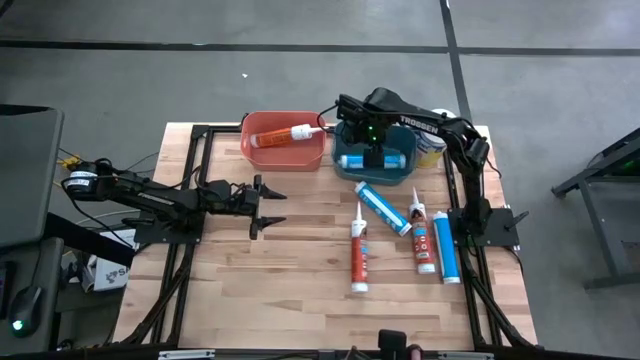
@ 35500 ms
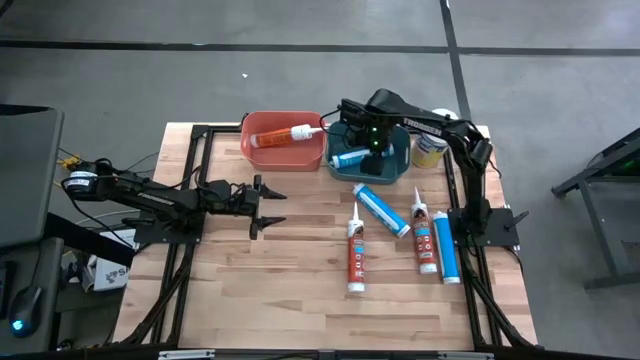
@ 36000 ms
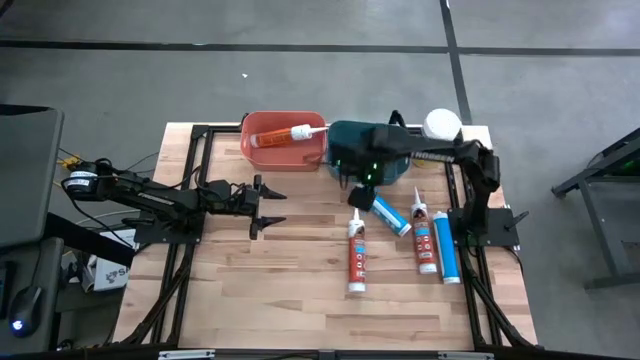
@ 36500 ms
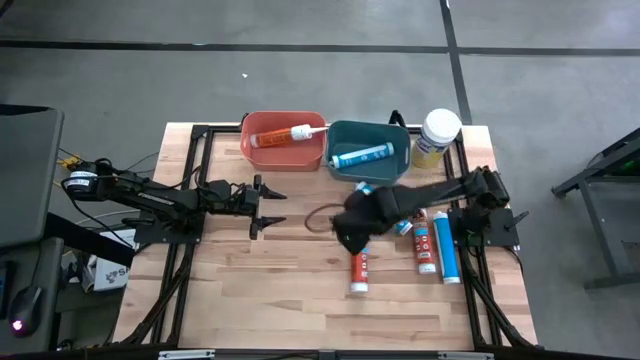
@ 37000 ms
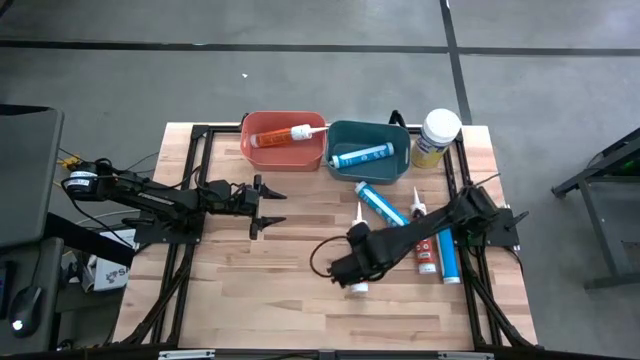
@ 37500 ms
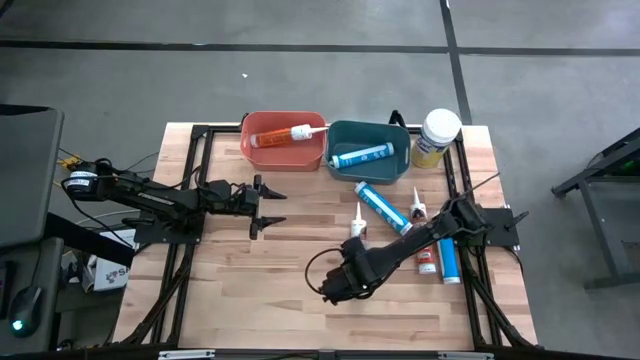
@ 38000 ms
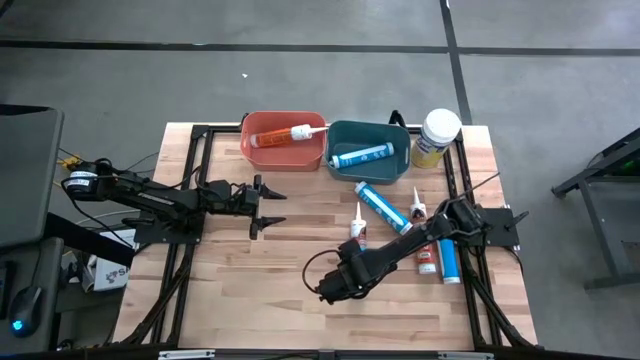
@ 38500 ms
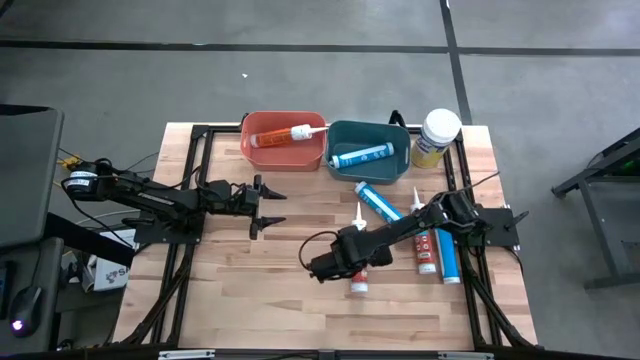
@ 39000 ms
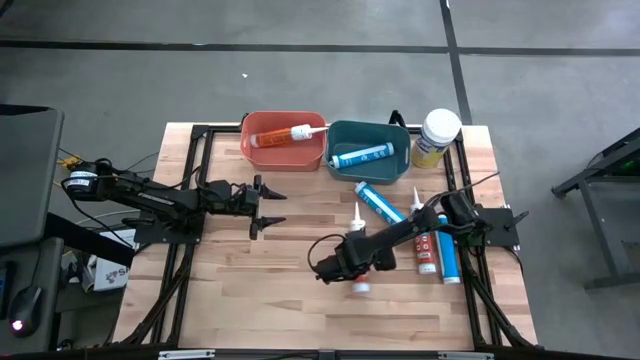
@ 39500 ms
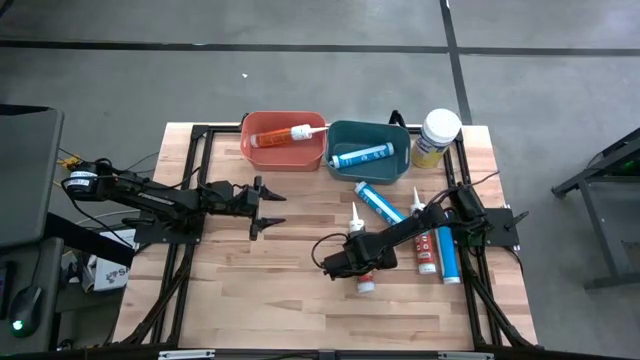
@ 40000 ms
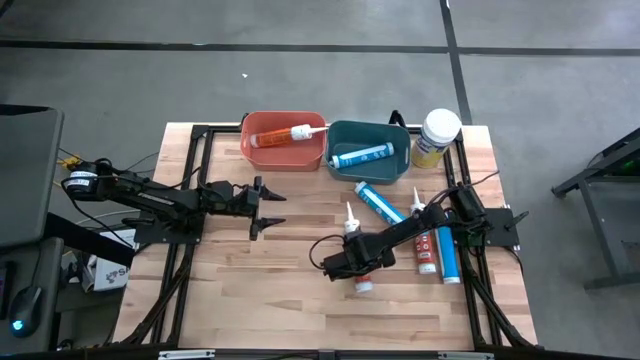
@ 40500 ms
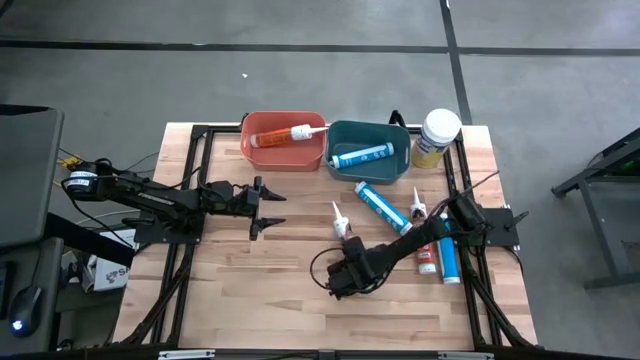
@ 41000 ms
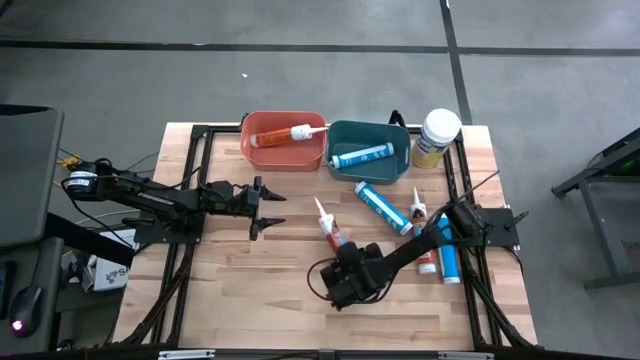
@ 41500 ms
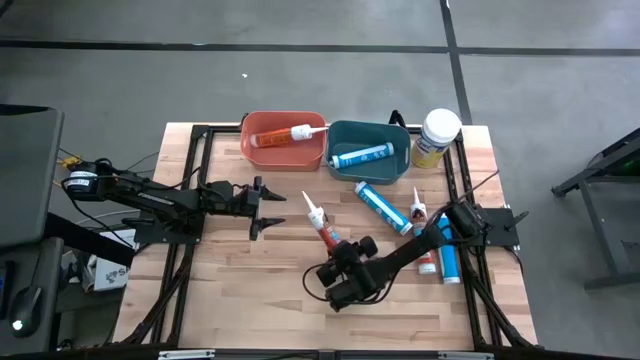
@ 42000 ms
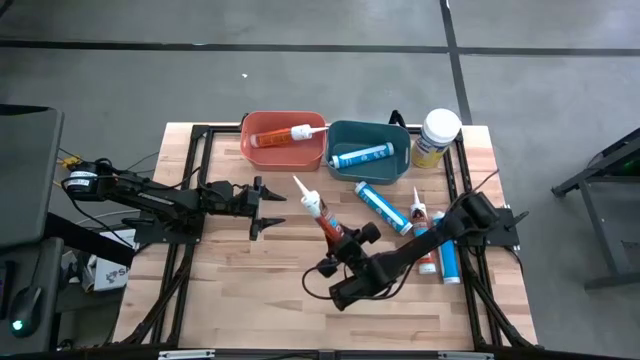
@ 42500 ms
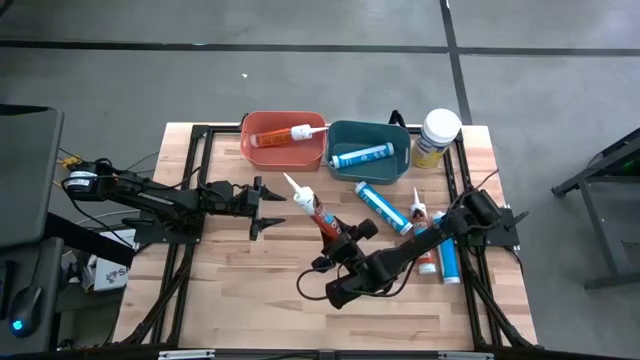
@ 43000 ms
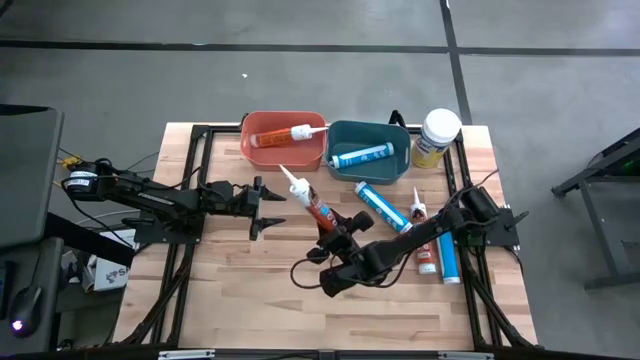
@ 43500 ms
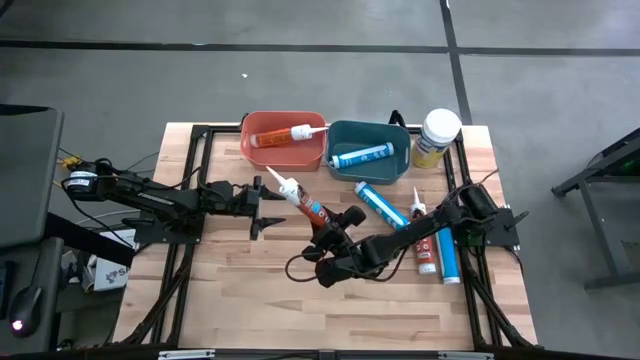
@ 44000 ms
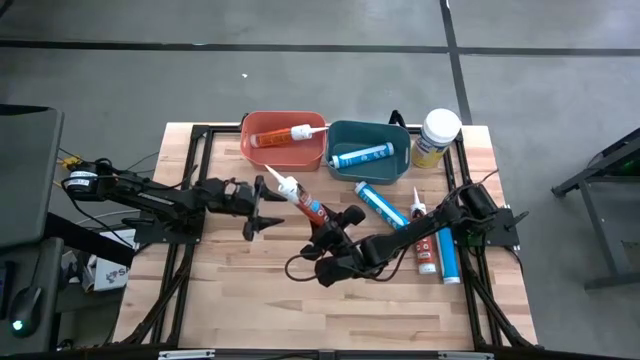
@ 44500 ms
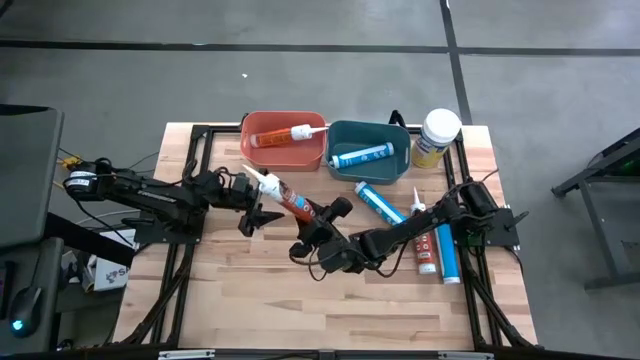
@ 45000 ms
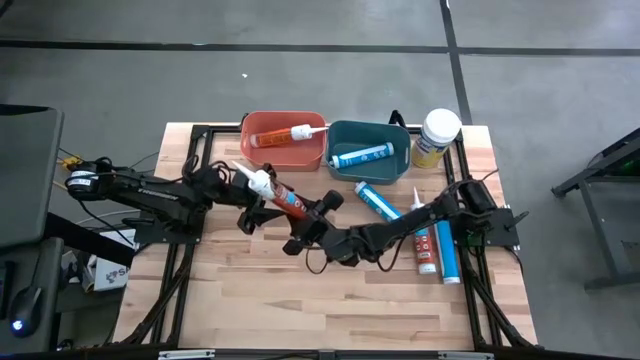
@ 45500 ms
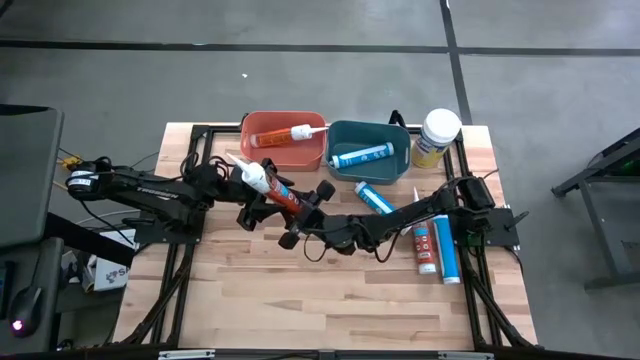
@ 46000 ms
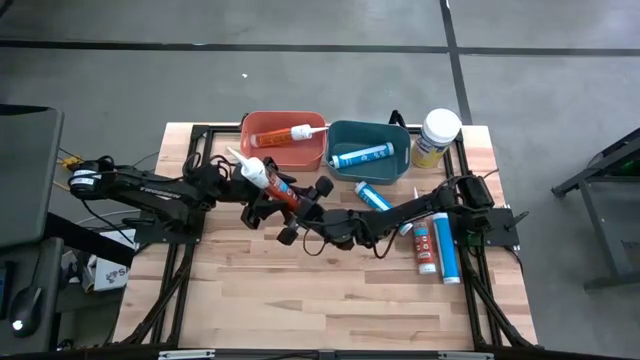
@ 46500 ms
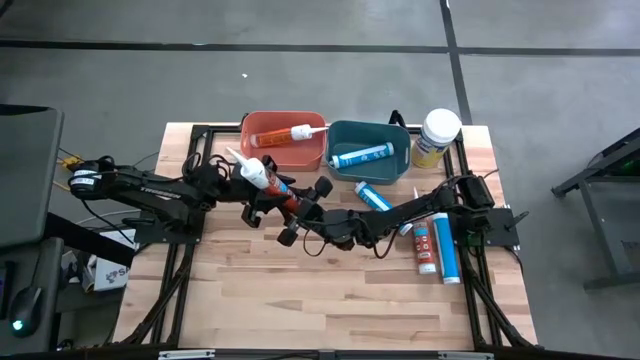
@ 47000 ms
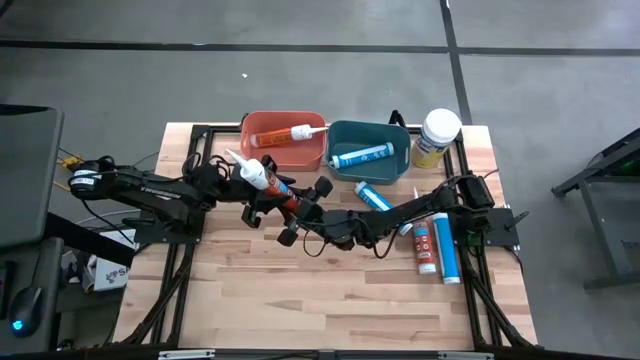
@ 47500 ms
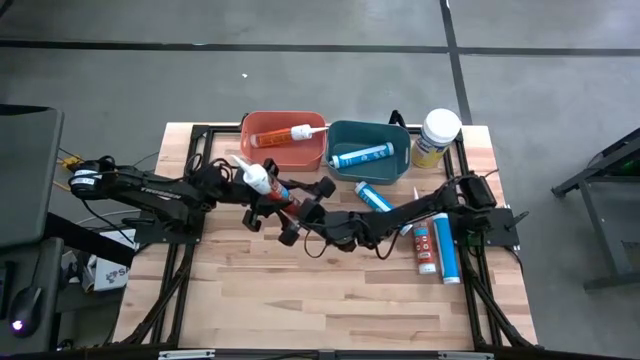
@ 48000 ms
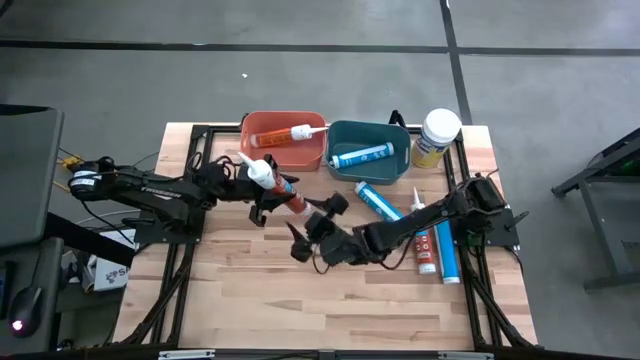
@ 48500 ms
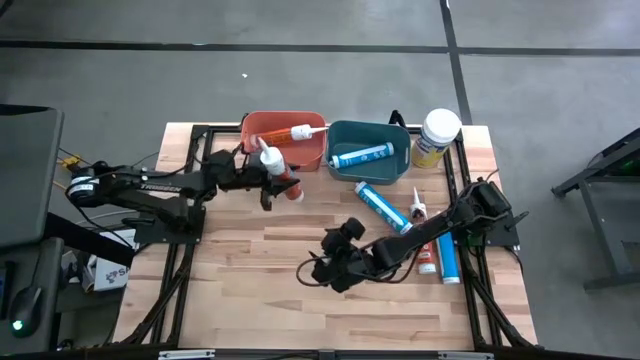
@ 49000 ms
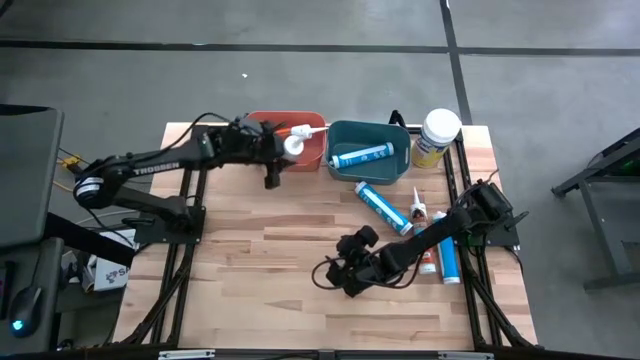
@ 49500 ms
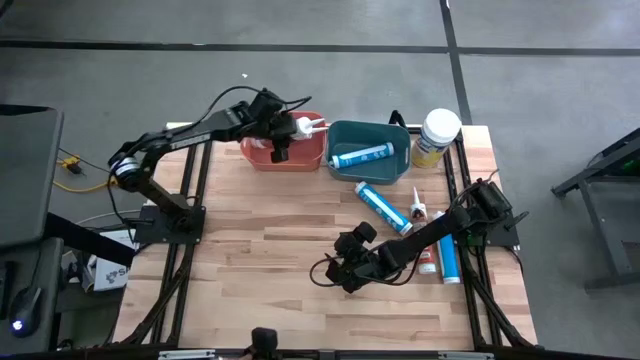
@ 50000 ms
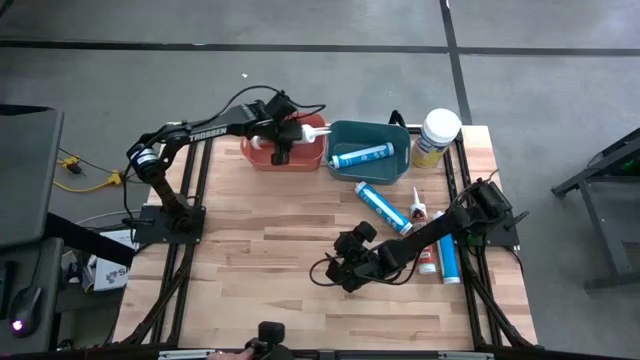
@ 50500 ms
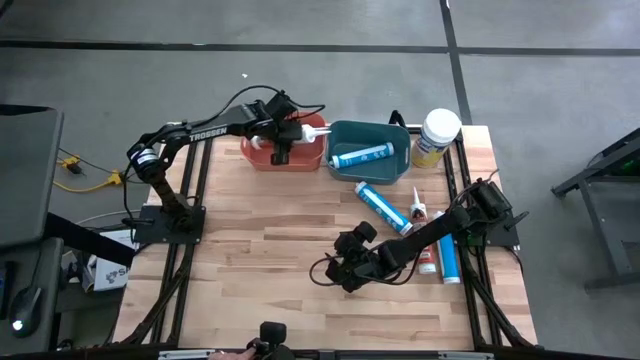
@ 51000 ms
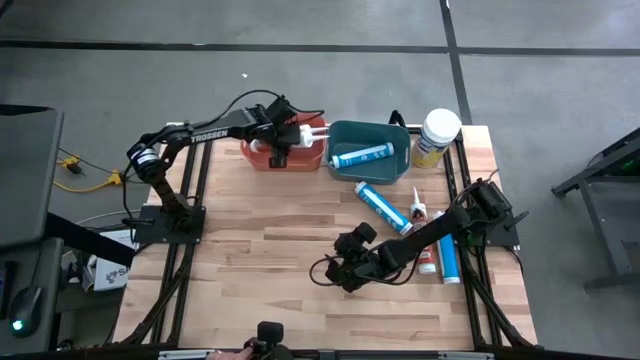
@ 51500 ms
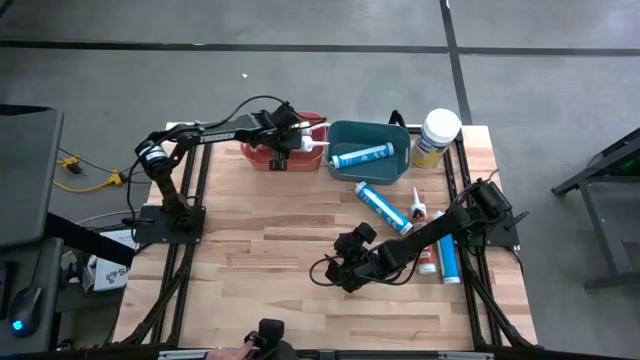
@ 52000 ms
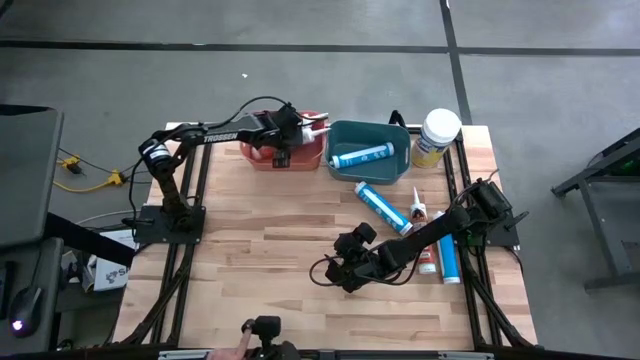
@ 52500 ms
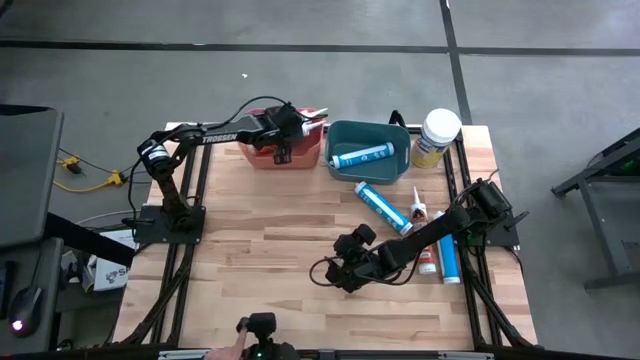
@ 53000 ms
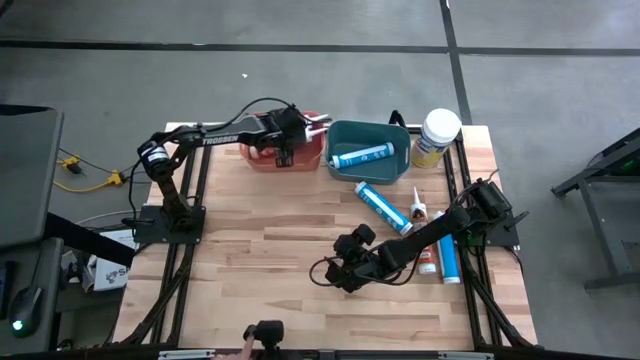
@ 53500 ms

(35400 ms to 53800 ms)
Task: Pick & place silicon tubes, Sealant and Lysol wipes
Put the left orange sealant into the orange bin

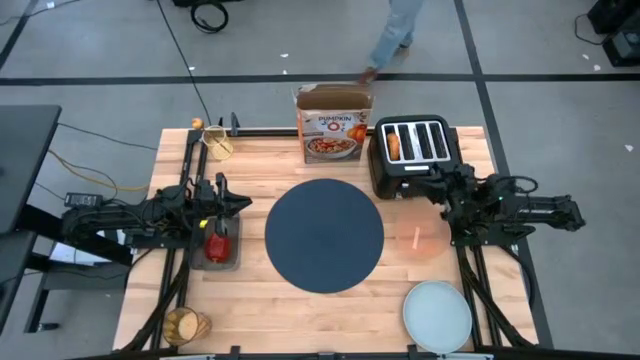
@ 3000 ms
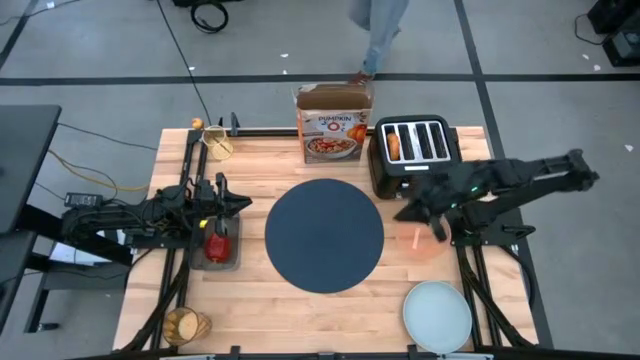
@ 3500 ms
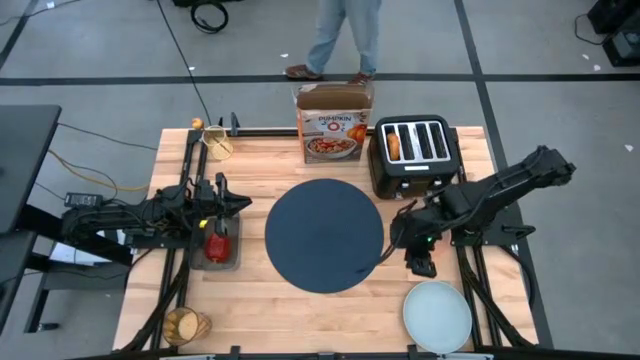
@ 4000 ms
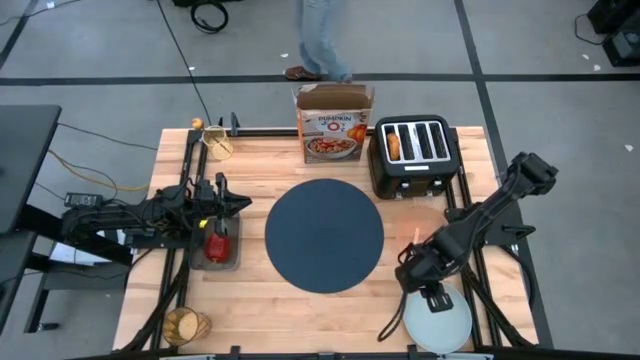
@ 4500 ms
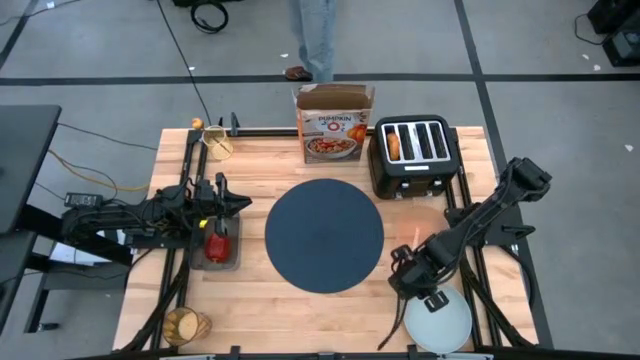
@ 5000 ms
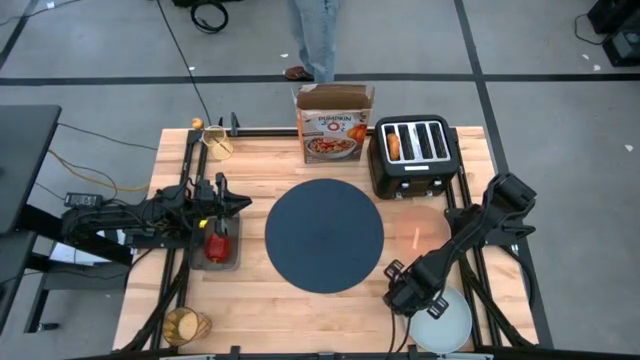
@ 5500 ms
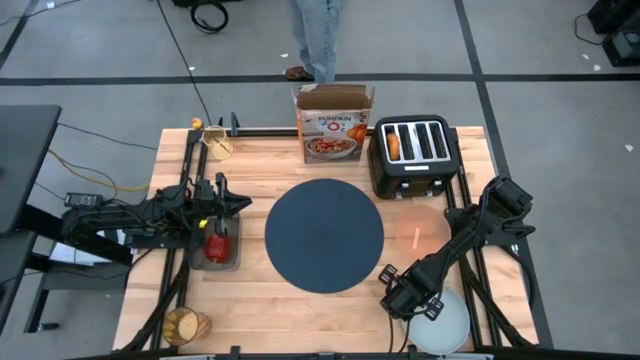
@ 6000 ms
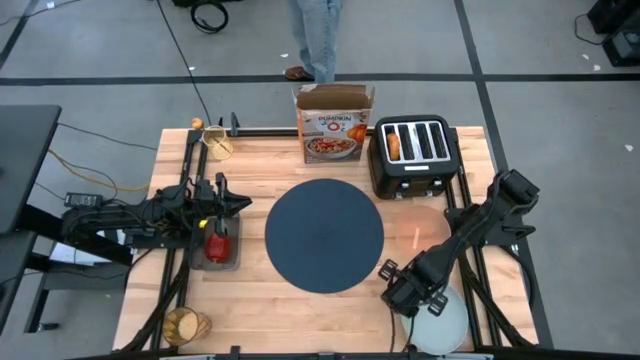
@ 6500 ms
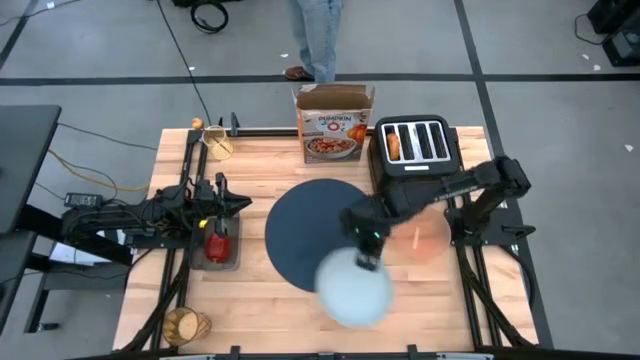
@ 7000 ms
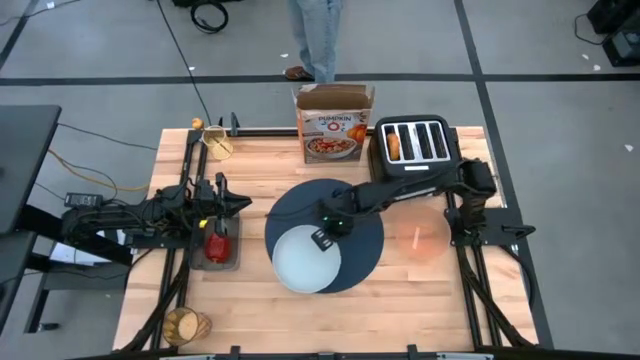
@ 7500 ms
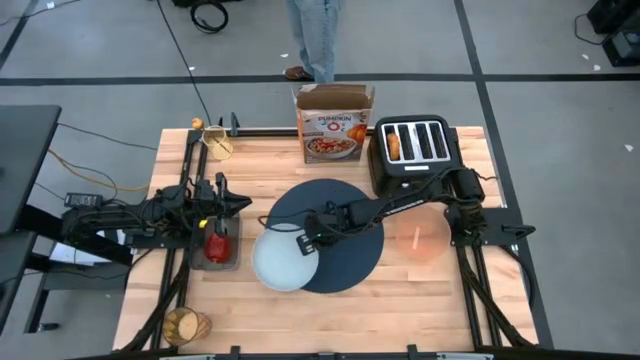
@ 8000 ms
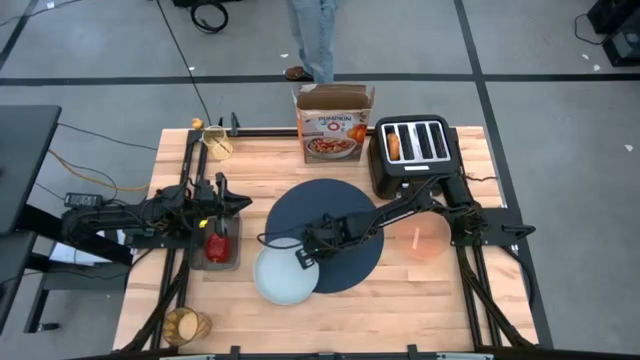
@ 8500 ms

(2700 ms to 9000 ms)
Task: Arrange a breakfast setting
Put the blue plate to the bottom left of the dark blue tablemat
